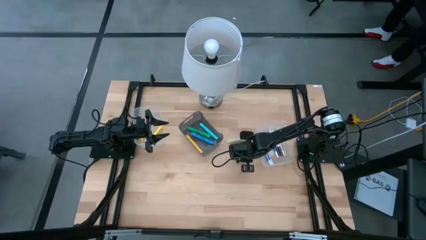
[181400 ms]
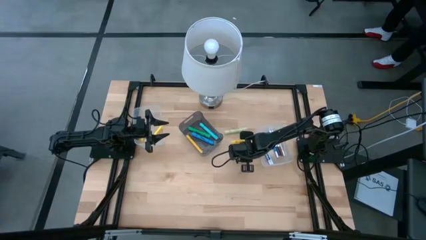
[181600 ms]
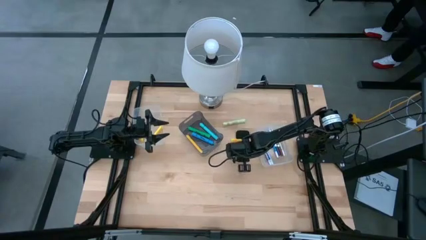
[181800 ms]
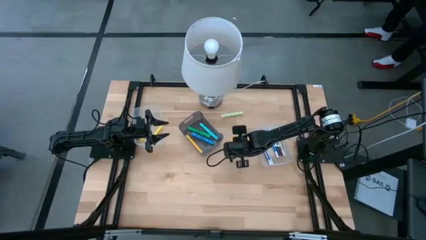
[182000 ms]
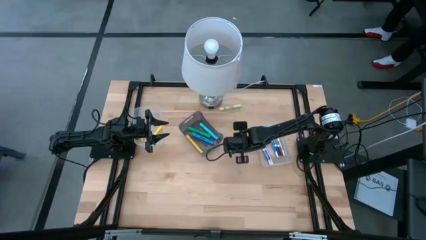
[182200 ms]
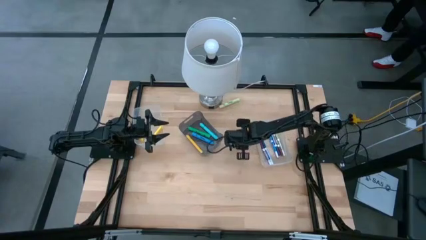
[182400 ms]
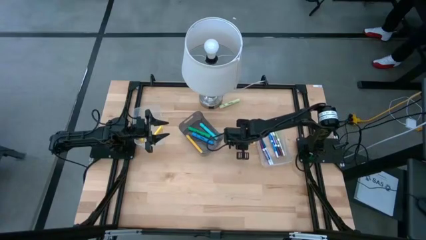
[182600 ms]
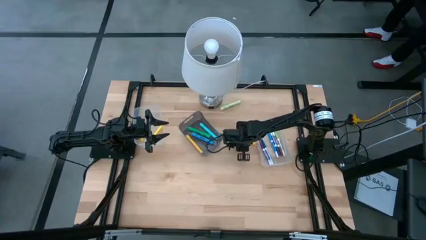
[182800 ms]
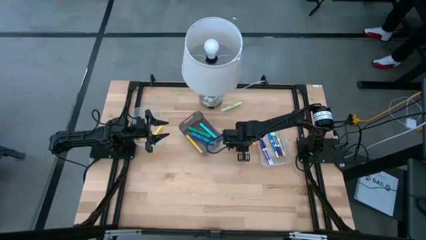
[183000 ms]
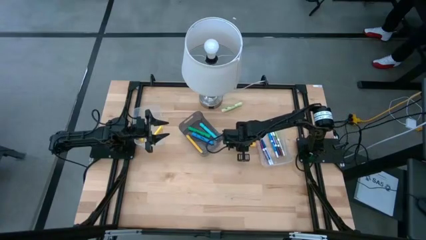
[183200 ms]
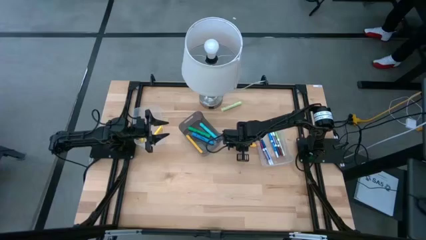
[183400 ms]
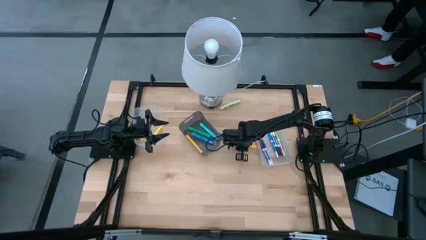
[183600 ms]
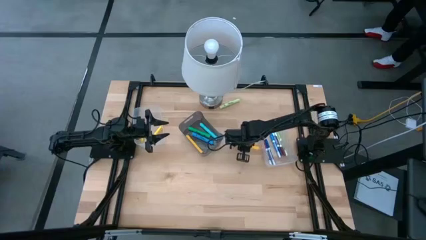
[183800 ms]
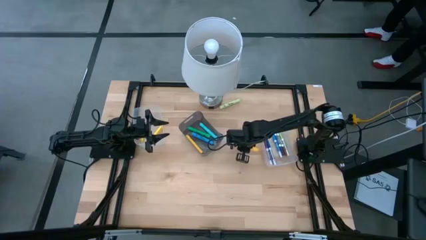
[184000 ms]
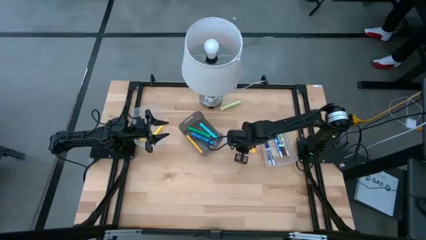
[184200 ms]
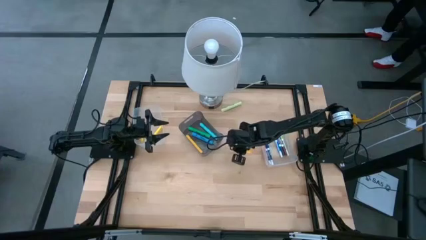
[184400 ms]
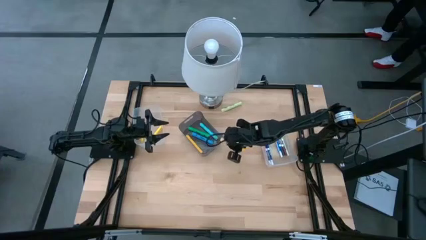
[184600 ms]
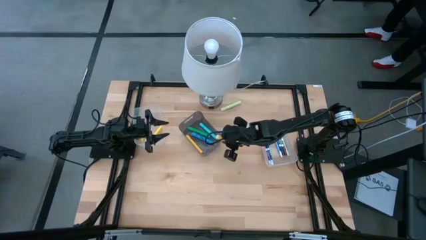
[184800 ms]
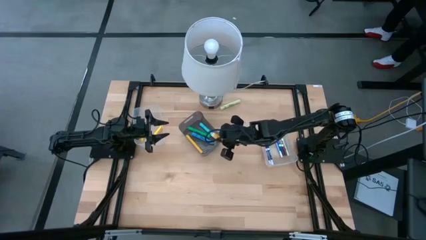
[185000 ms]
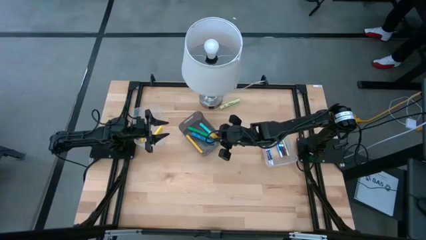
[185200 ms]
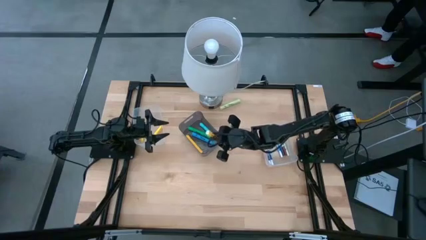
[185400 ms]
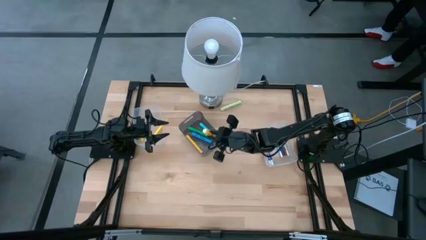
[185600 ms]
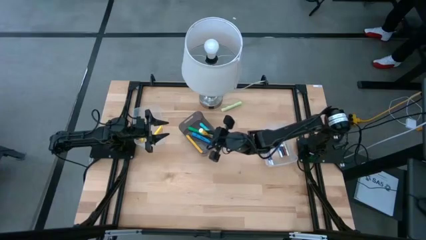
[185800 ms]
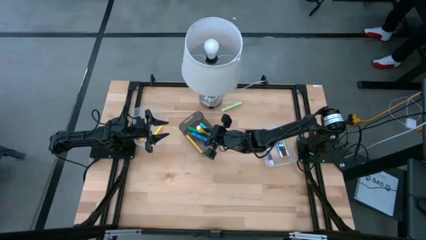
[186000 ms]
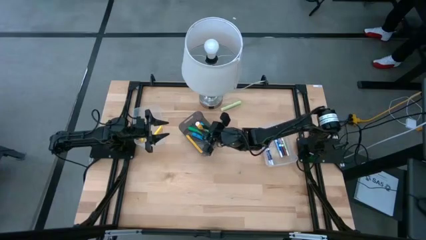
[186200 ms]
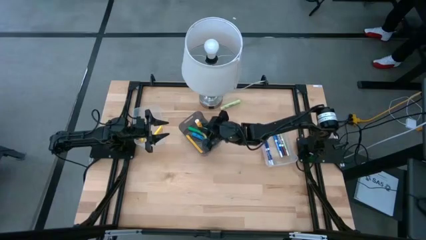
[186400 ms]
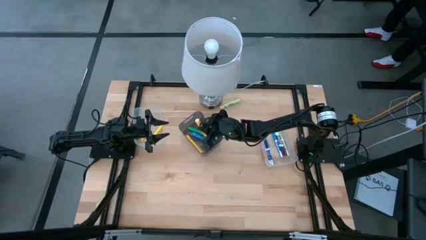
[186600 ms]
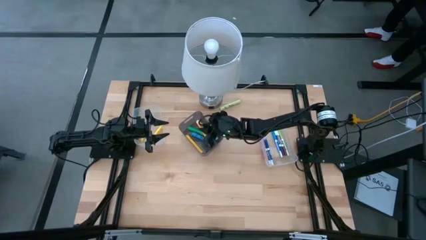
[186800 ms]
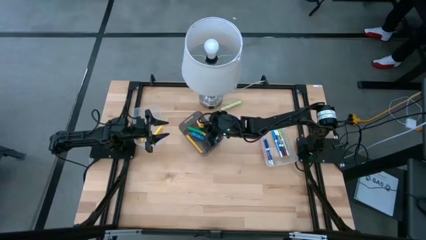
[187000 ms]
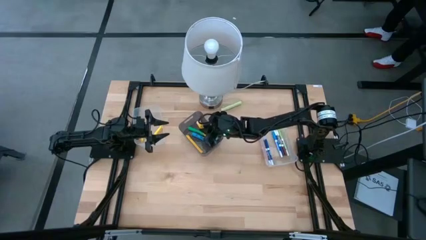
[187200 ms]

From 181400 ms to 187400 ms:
Task: Pick & Place Markers
Put the yellow marker into the black bin

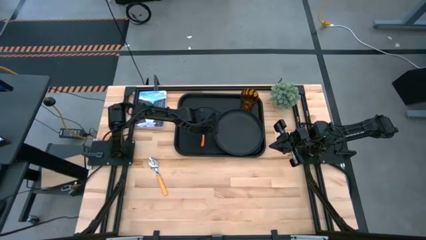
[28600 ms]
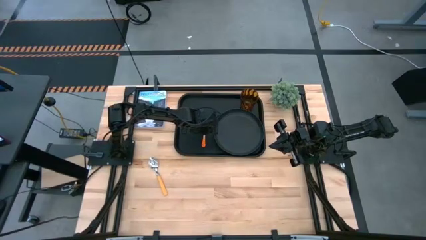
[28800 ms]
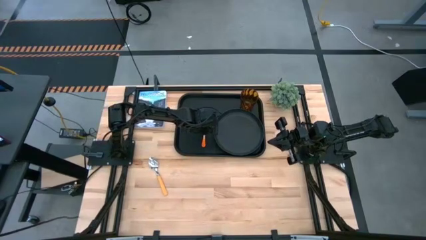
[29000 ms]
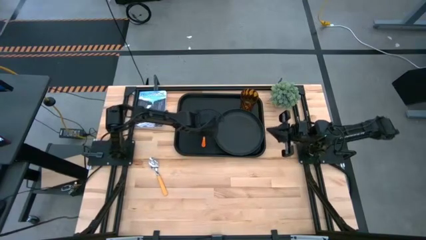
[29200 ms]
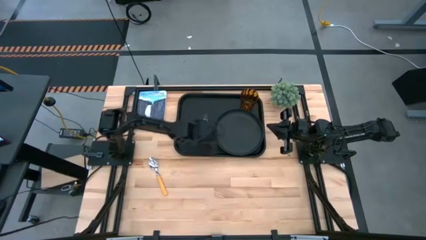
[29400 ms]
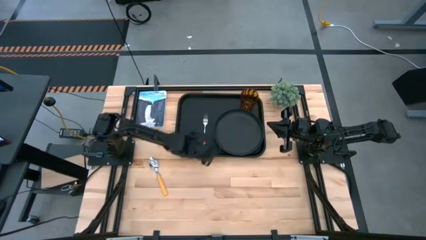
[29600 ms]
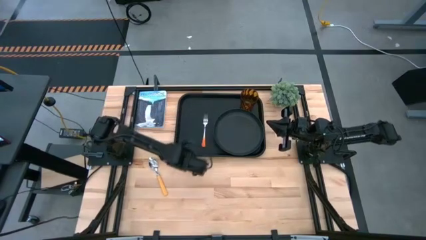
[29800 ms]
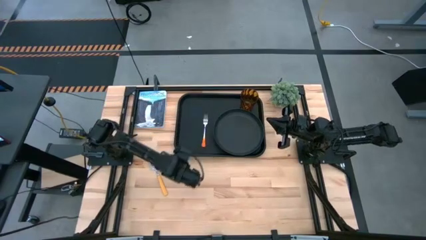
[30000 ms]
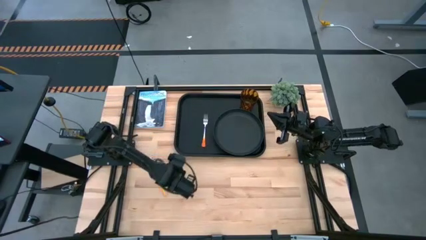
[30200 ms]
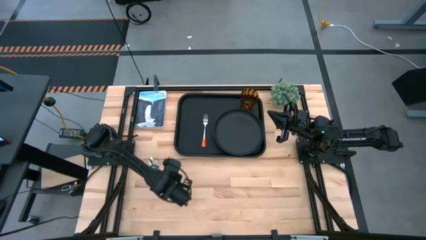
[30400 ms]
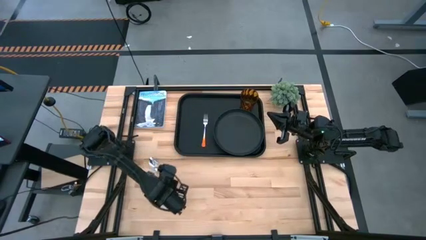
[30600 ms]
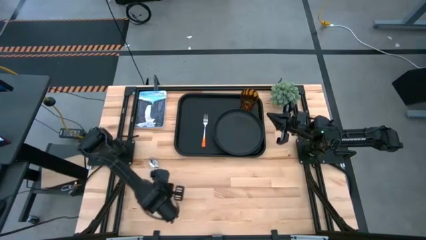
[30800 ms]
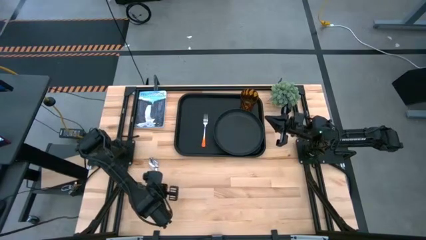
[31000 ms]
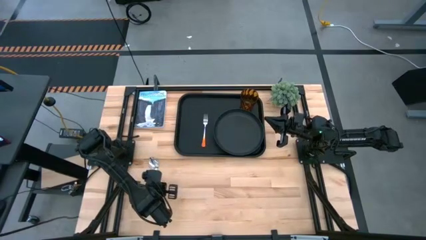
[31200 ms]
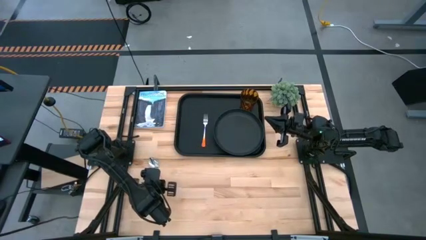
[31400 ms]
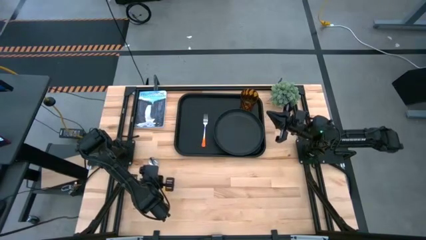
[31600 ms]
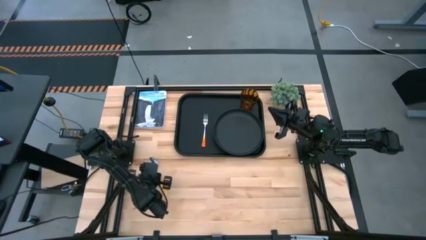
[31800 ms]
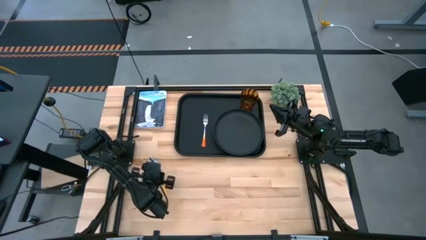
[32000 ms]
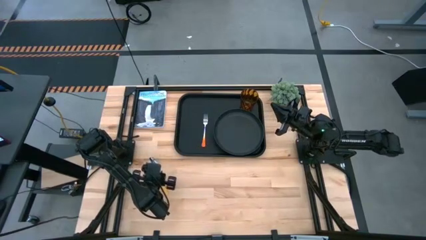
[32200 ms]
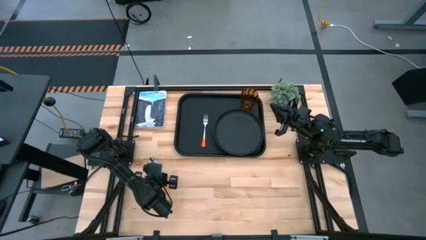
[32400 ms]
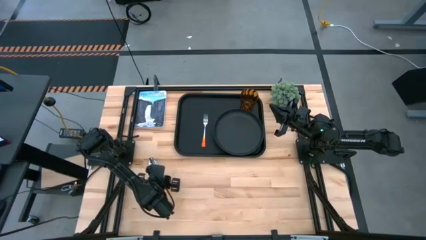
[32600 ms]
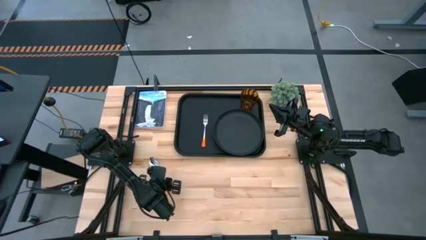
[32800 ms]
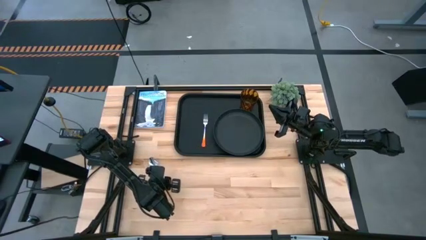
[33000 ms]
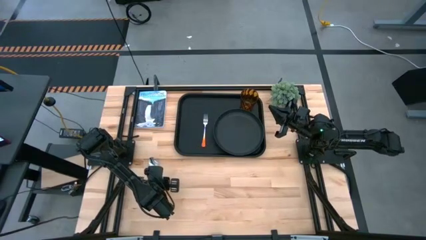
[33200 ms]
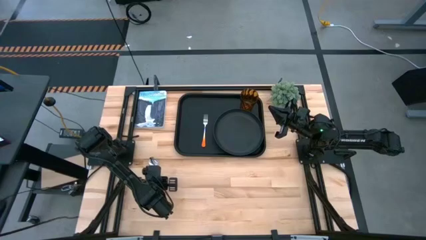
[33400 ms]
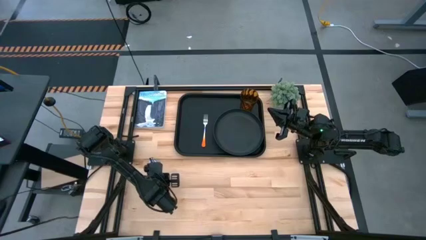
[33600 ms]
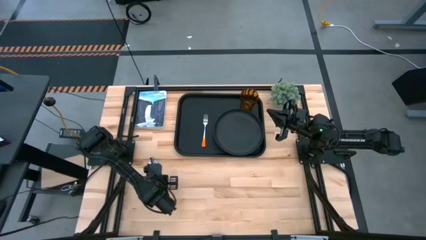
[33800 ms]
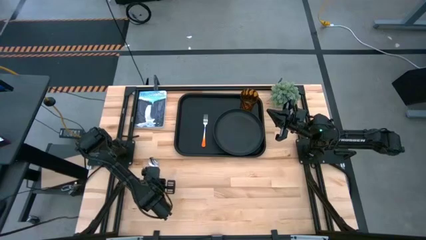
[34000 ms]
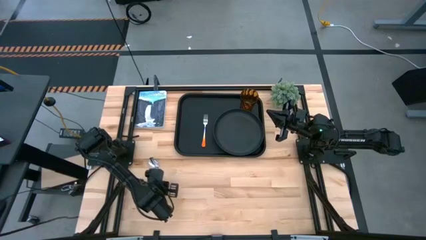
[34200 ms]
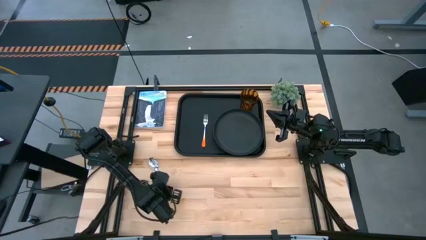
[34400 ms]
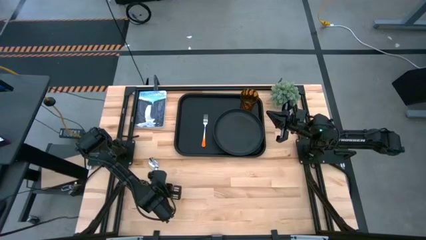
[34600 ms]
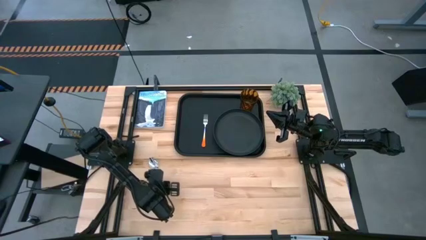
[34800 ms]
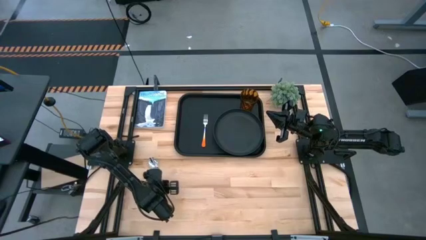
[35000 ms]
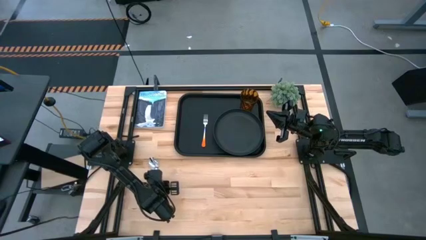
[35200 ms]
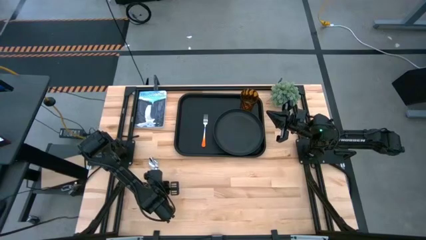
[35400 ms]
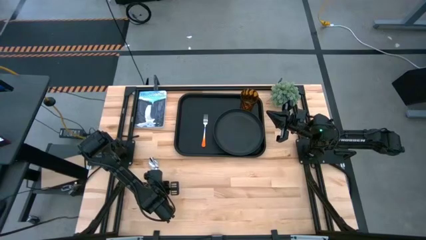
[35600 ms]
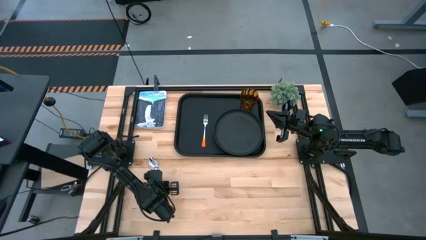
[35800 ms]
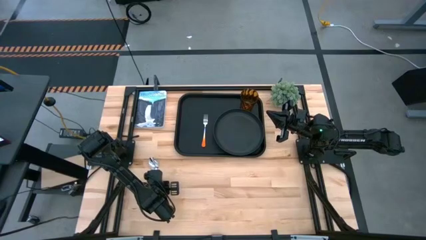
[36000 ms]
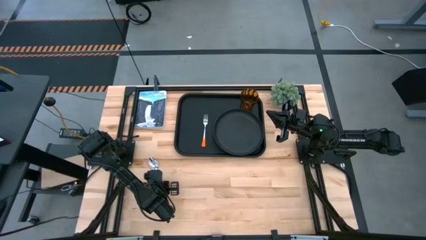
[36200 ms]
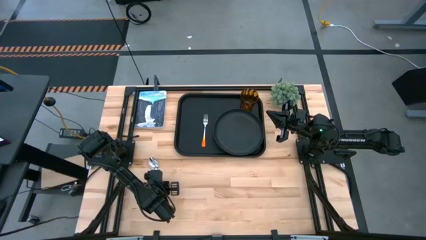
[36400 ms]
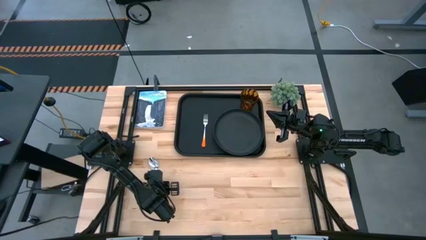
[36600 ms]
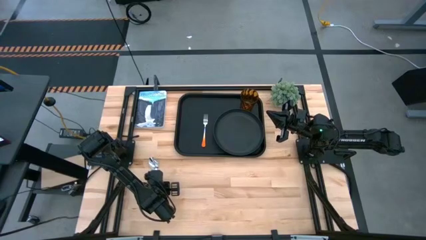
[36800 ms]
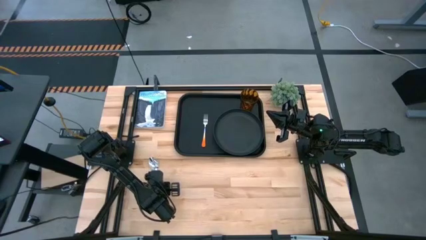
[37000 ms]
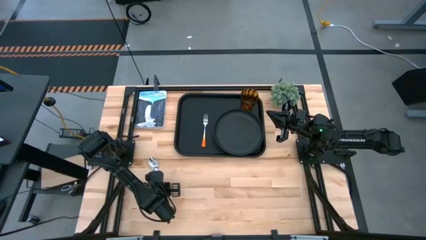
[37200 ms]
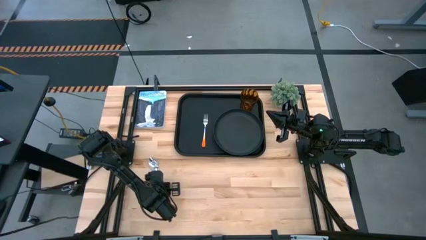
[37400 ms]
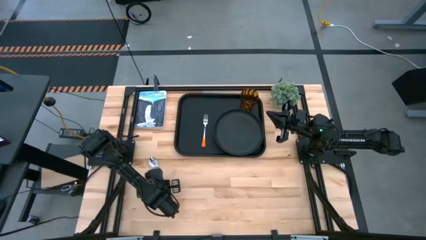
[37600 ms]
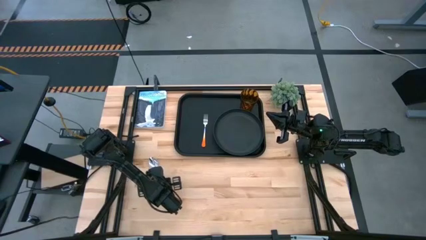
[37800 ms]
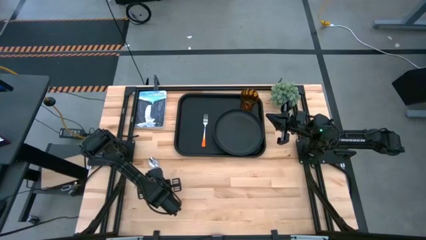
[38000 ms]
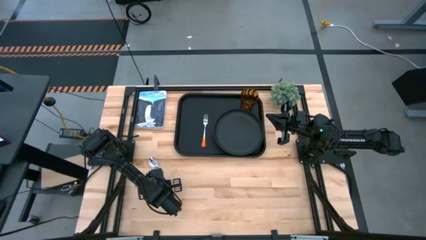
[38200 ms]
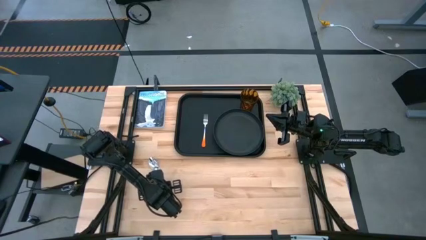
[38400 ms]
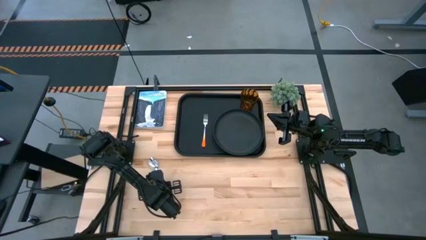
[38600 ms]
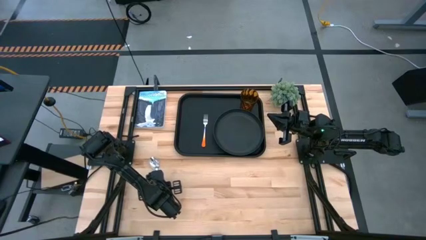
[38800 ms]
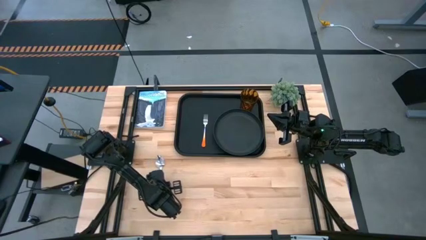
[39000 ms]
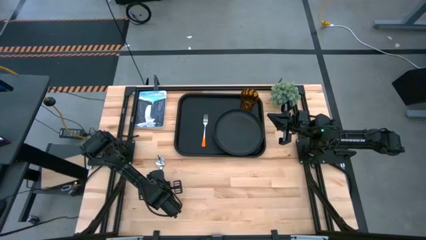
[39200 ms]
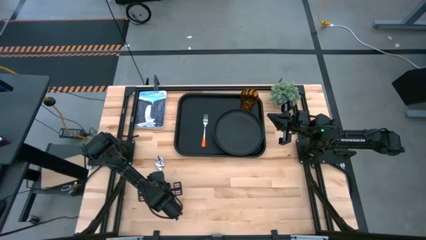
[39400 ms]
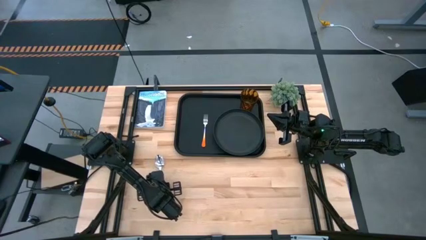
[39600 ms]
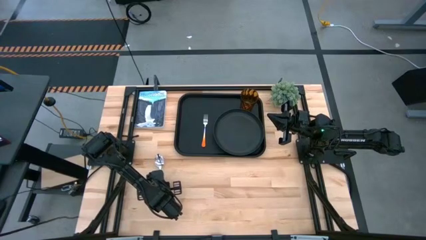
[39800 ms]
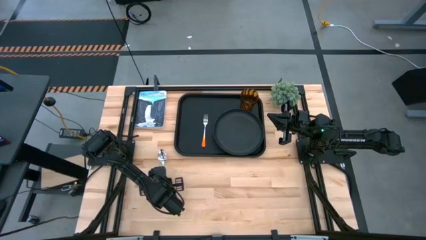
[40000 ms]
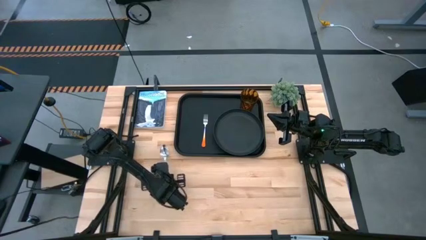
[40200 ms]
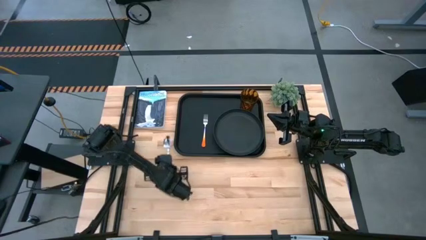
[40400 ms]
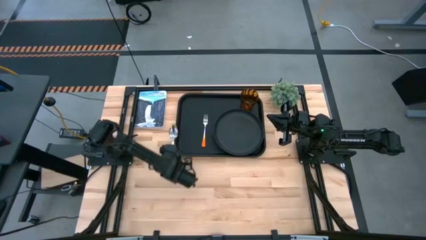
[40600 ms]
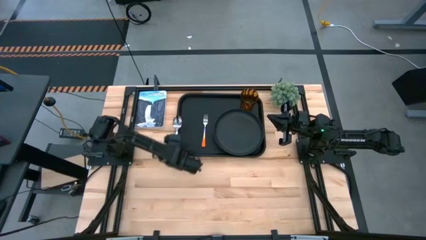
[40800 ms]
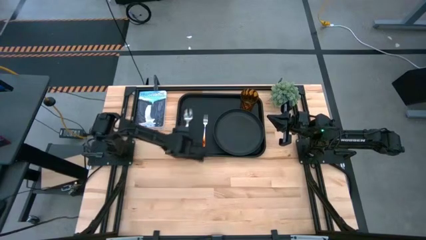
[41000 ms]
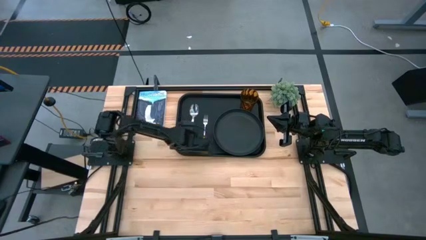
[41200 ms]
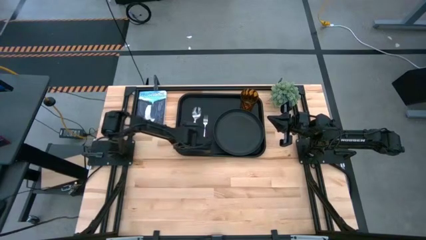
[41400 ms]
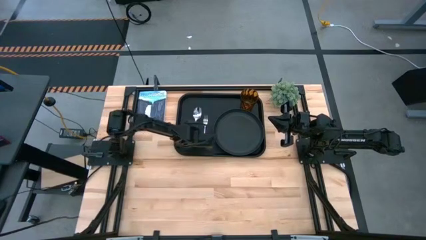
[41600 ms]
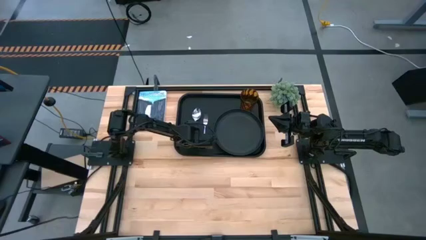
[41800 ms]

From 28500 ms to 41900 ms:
Task: Pick and place plate/cup/fork/spoon on tray
Put the yellow spoon to the left of the orange fork on the black serving tray
